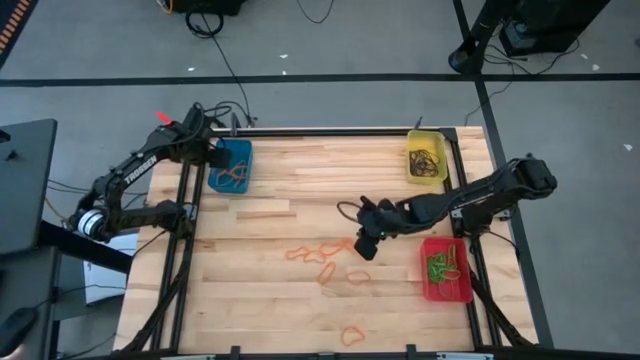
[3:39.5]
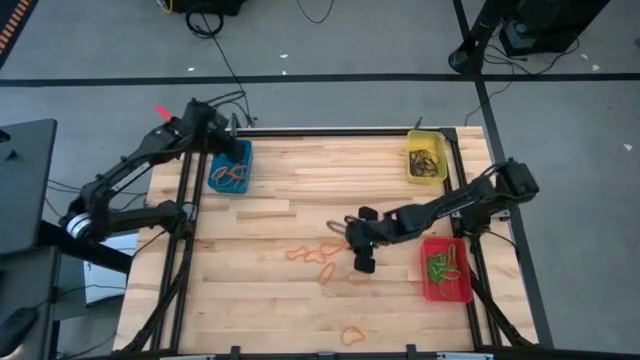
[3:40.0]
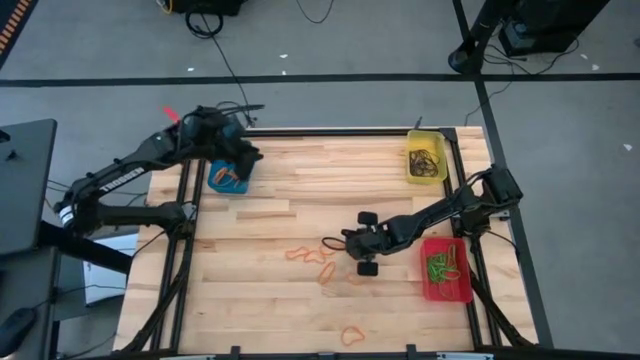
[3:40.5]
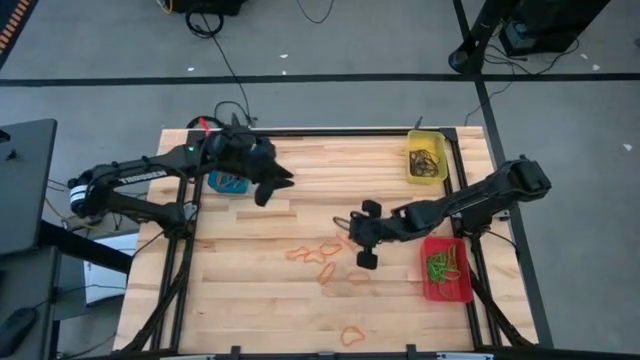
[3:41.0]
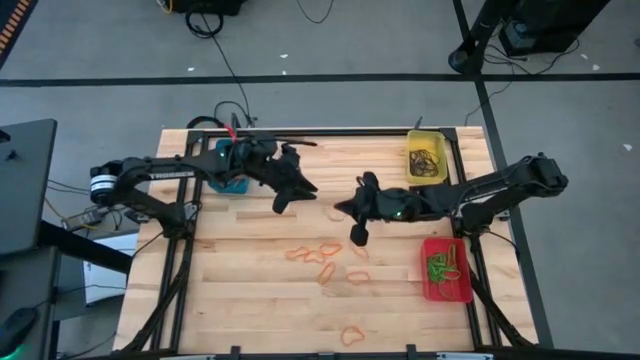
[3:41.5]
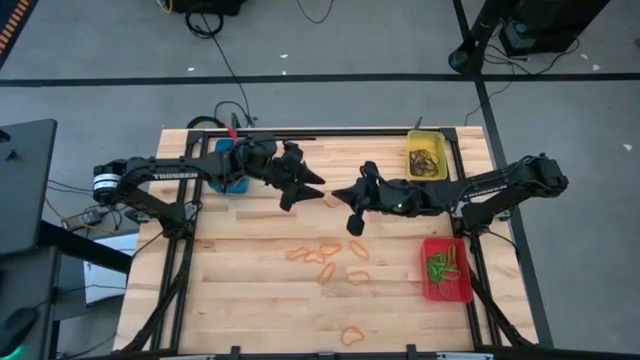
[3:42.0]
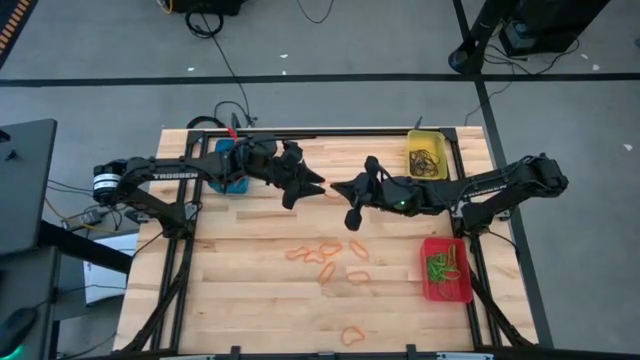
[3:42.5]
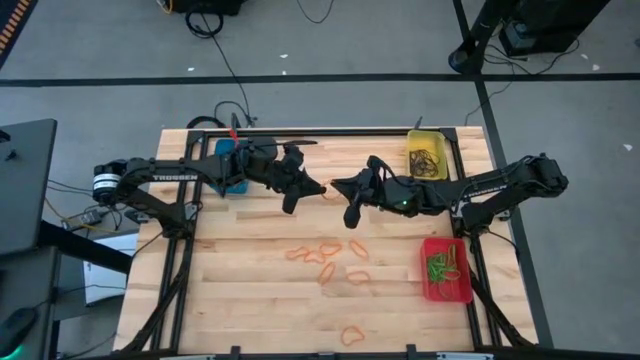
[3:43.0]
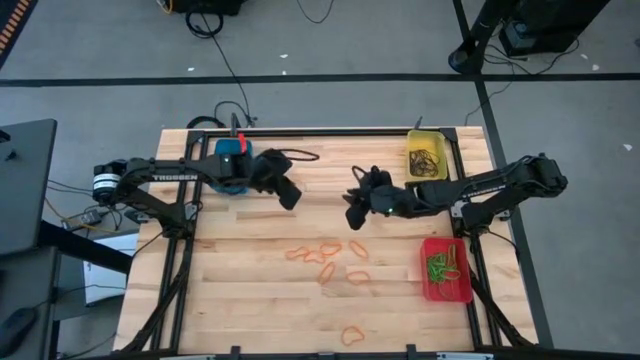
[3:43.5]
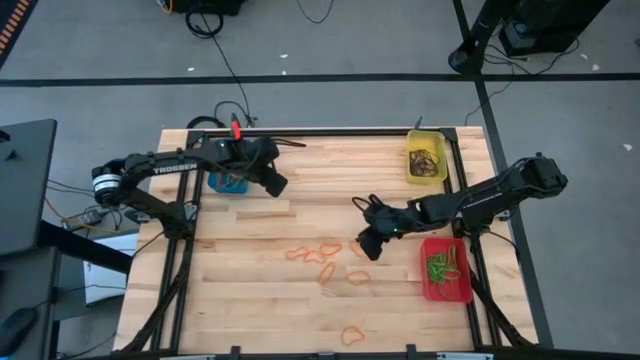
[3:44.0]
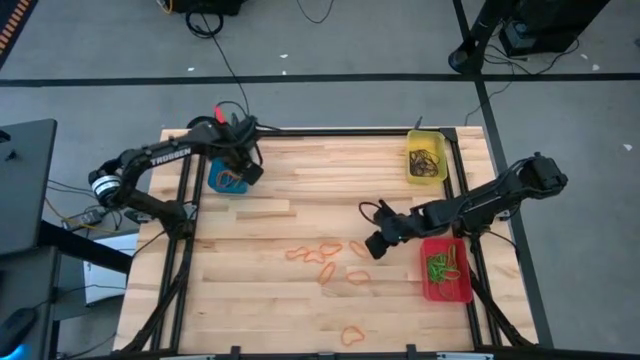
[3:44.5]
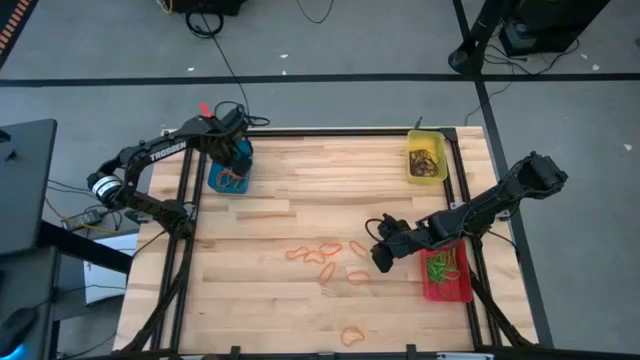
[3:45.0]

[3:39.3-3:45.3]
Task: Sort rubber bands into baskets
Put the orange rubber band into the blue bin

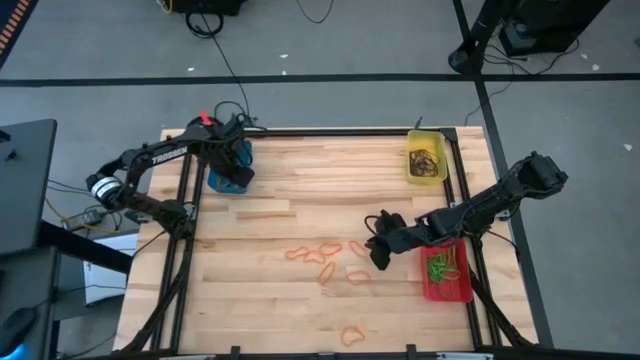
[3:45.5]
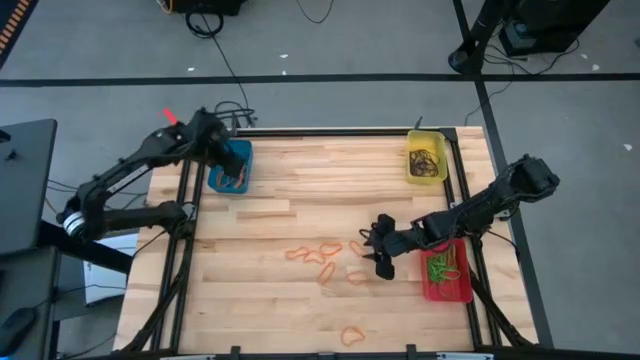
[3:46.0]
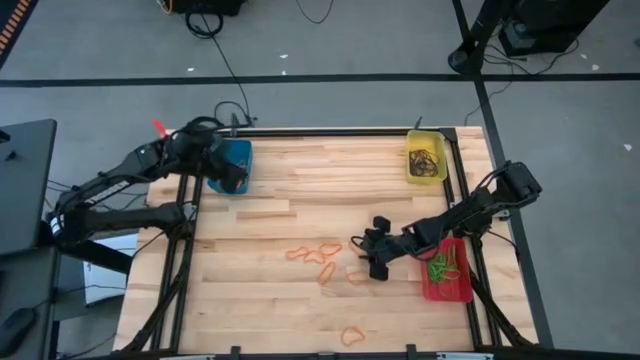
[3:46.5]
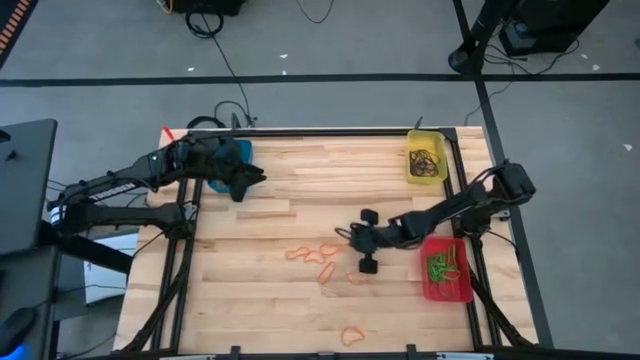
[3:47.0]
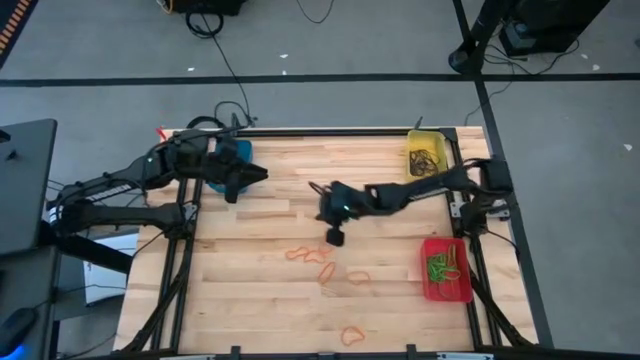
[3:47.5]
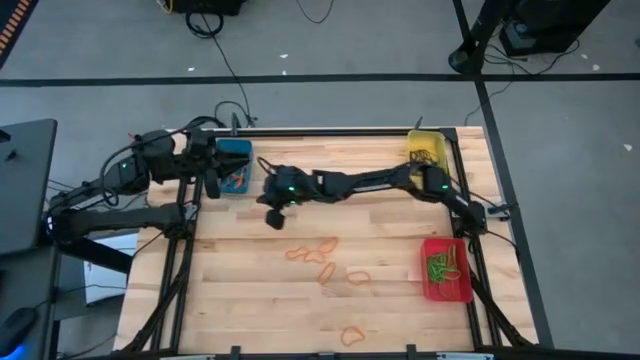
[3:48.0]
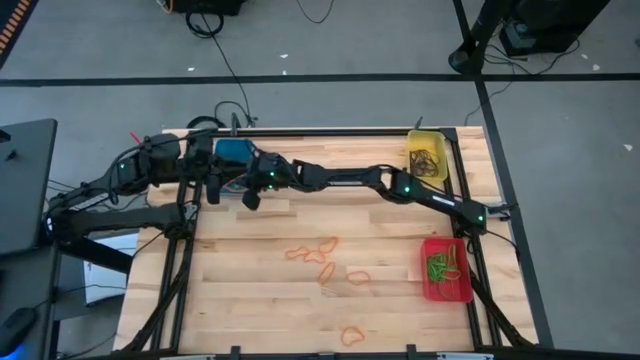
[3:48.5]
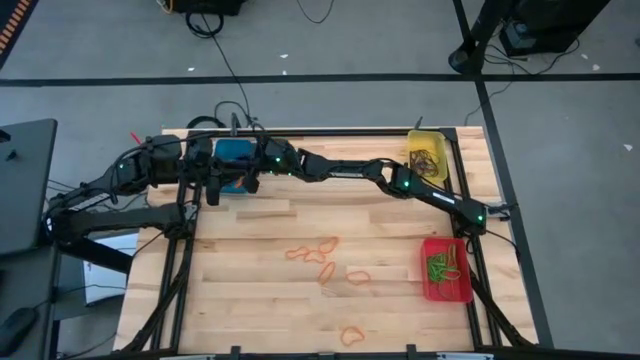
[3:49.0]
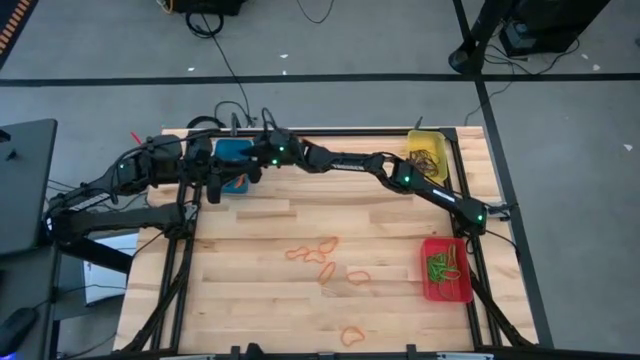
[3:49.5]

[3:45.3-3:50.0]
Put the orange rubber band into the blue bin

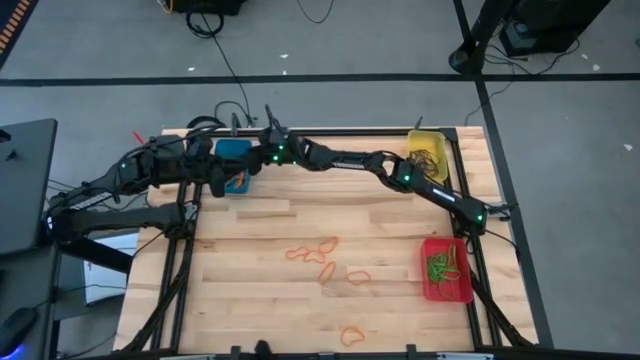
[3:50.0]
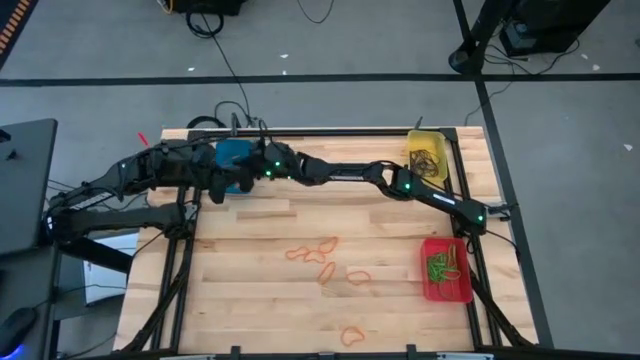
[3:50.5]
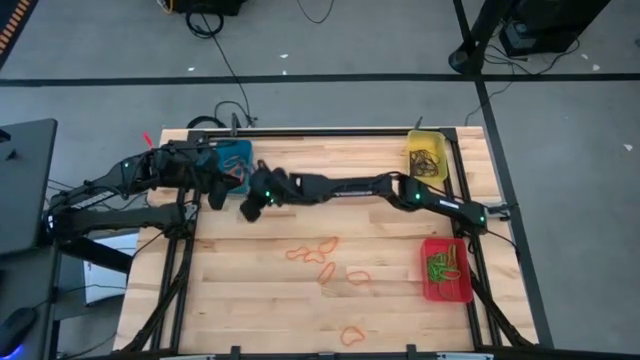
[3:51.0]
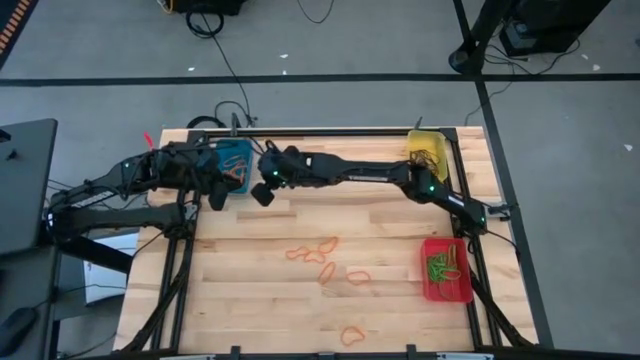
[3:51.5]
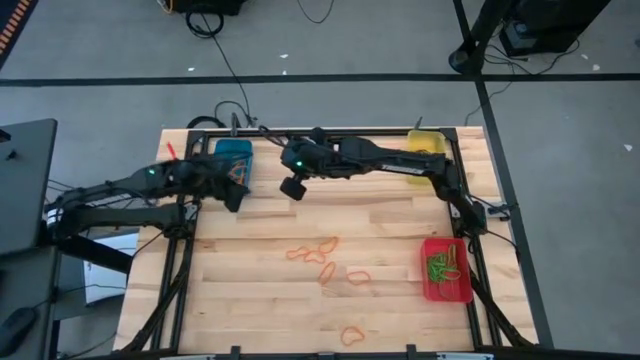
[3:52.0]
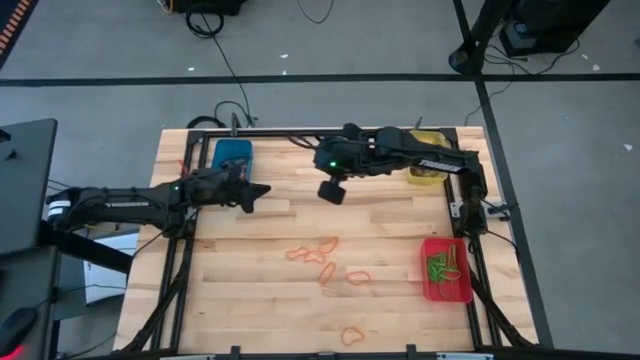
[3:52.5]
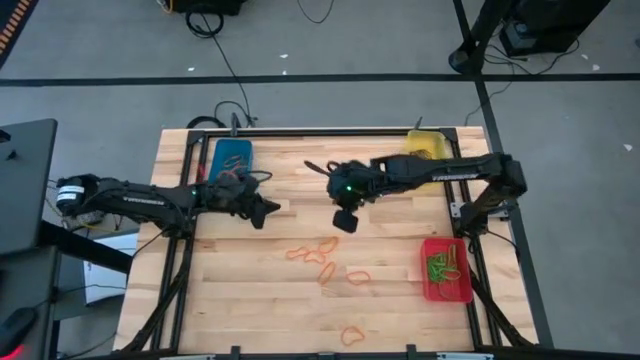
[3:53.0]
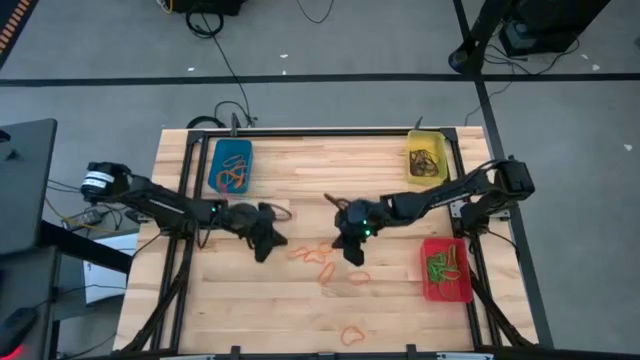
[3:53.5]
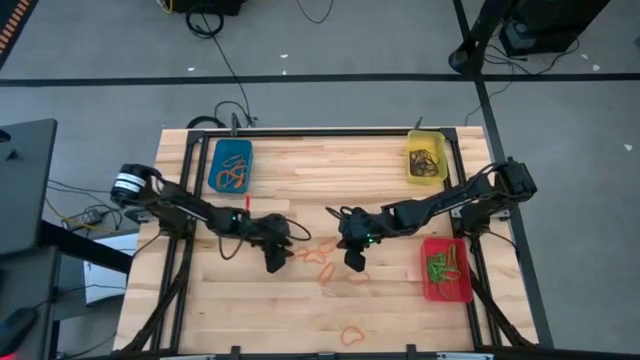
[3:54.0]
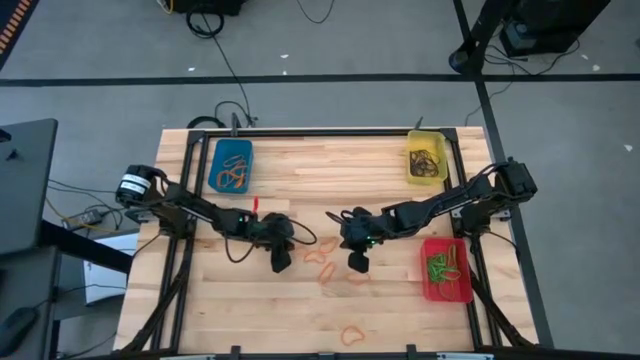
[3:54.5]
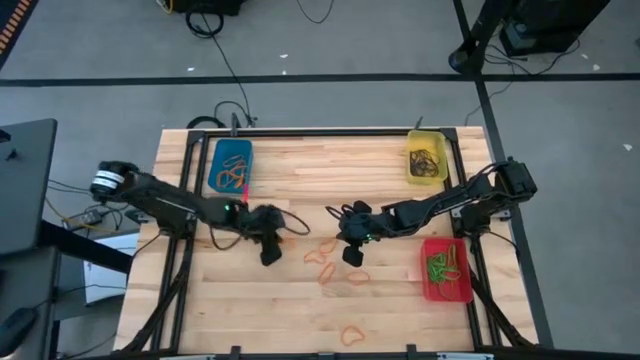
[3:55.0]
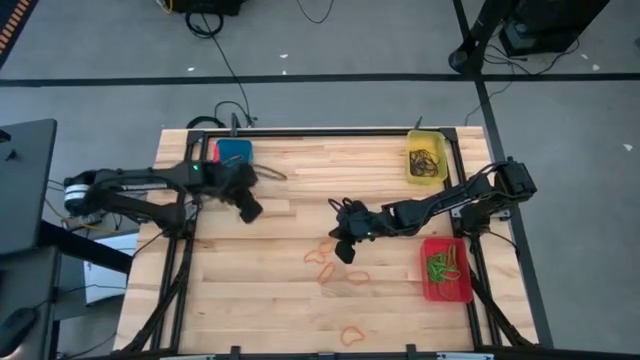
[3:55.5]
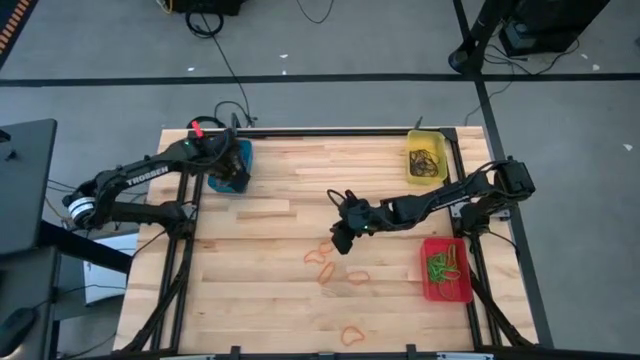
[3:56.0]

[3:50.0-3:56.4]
Put the orange rubber band into the blue bin

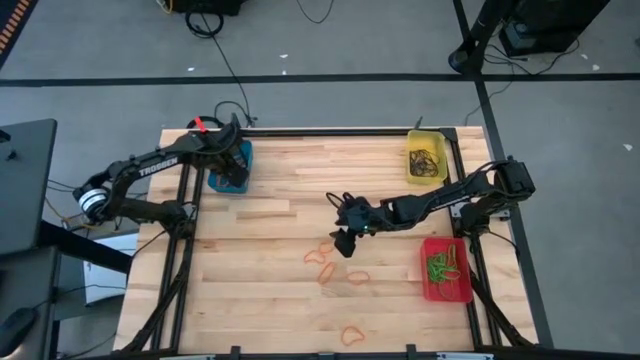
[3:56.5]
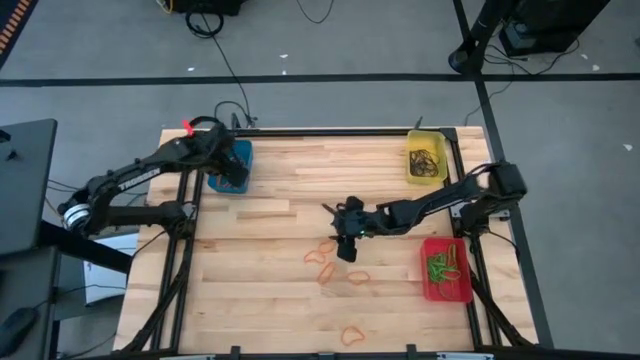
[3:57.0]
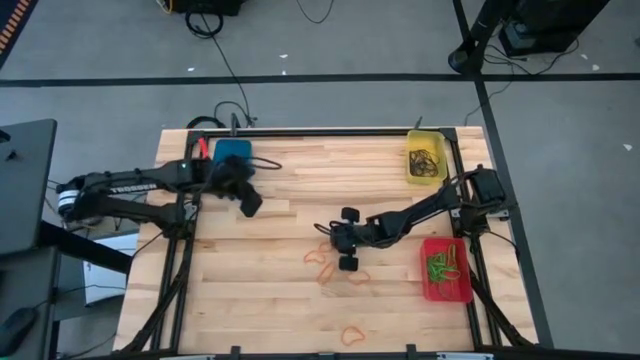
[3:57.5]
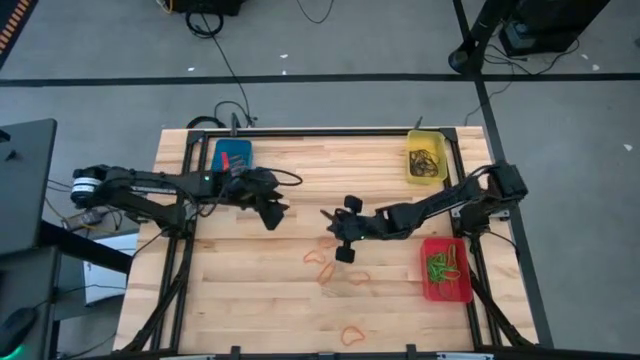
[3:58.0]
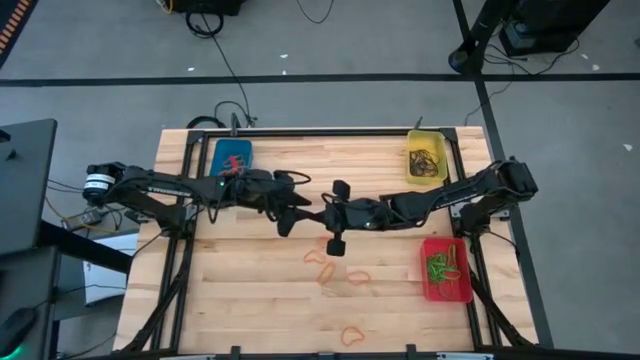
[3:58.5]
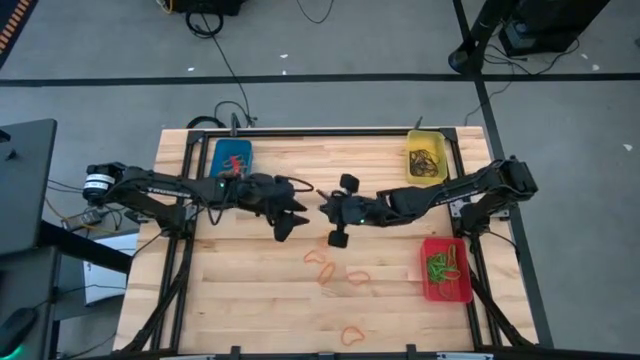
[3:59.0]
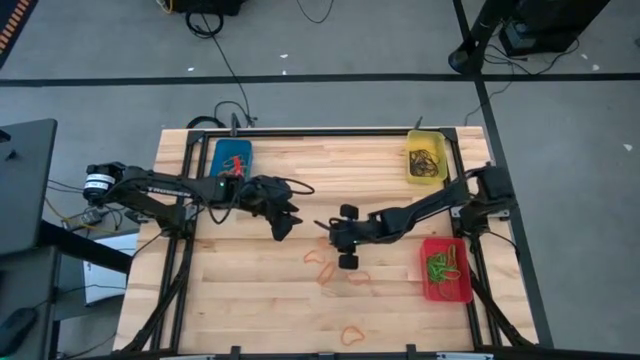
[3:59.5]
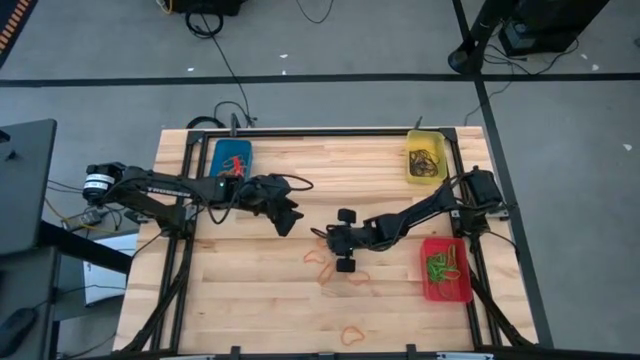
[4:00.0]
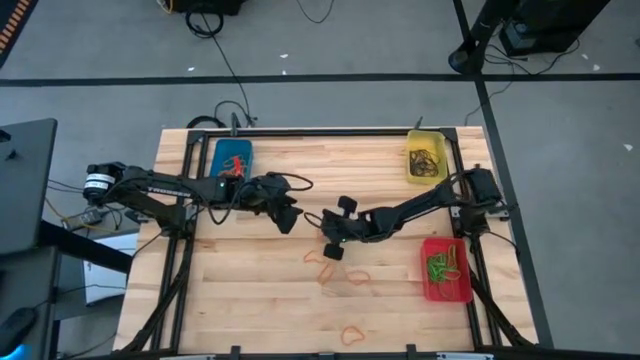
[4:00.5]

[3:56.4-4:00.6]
Put the orange rubber band into the blue bin
